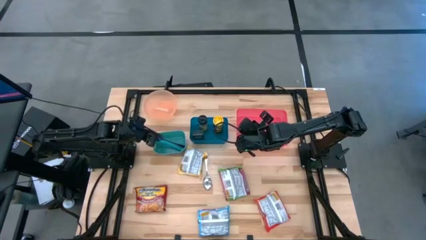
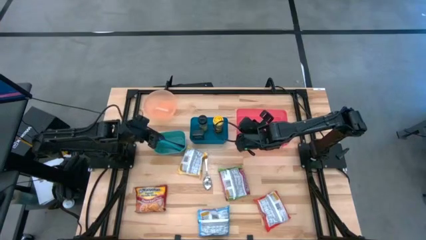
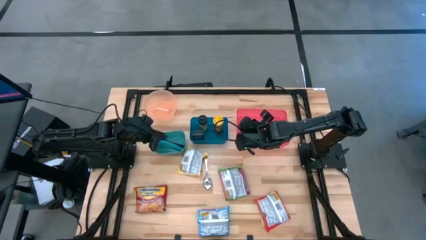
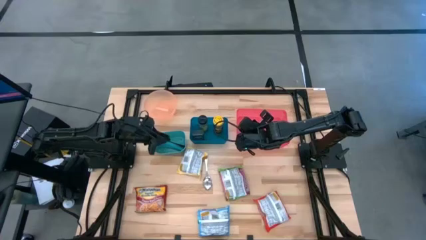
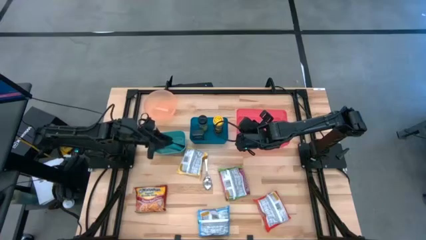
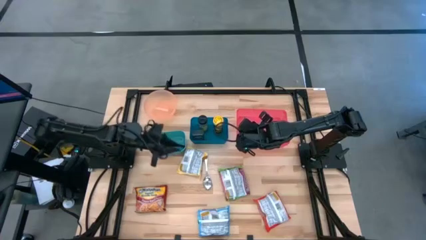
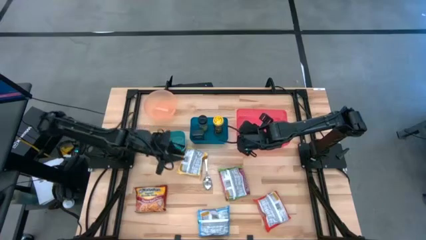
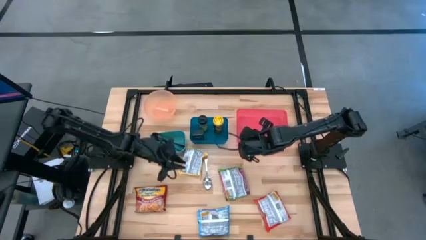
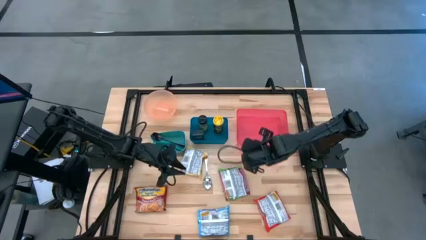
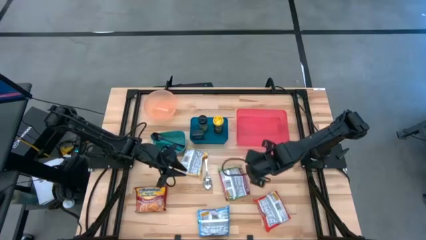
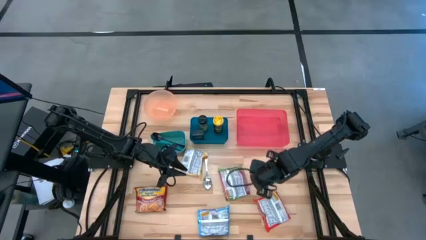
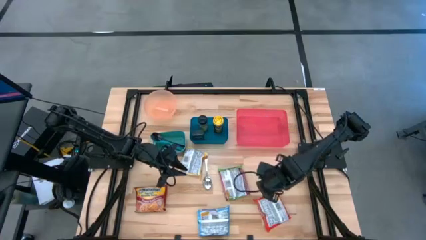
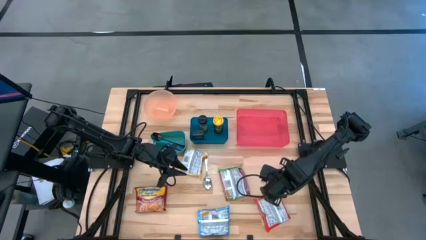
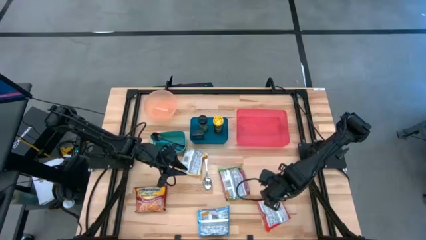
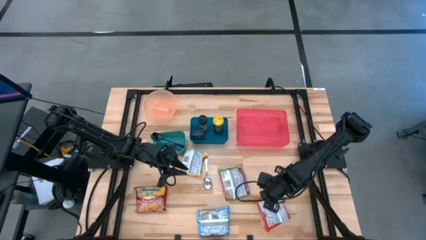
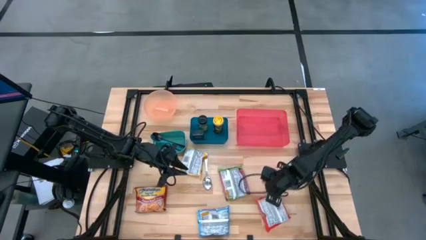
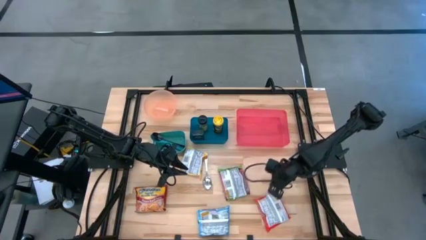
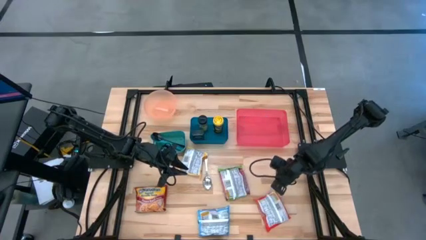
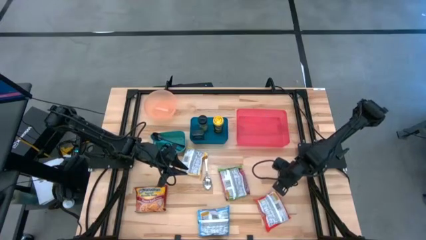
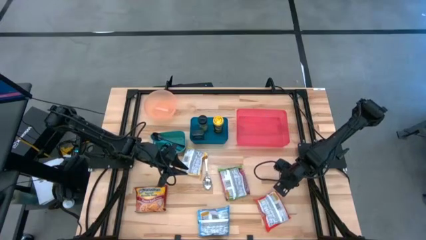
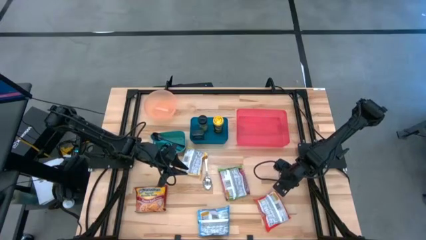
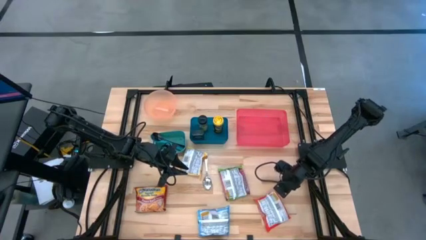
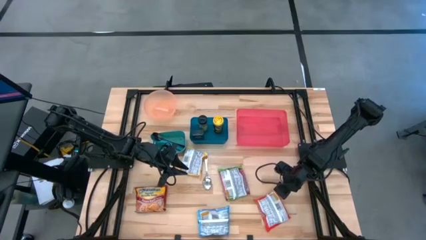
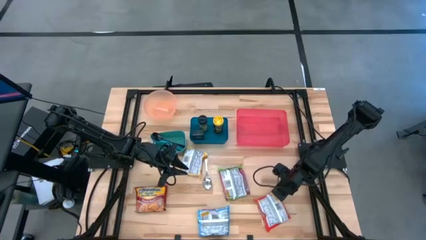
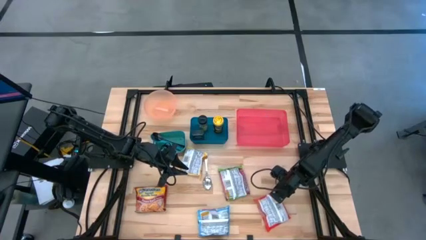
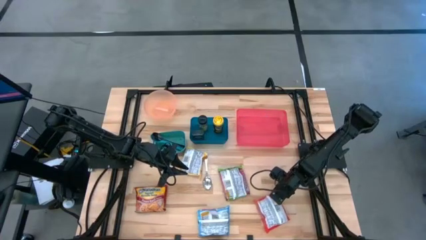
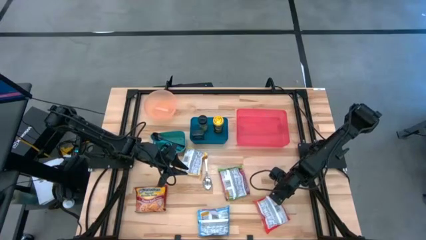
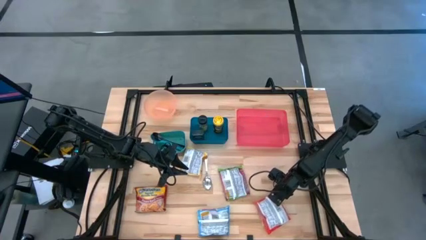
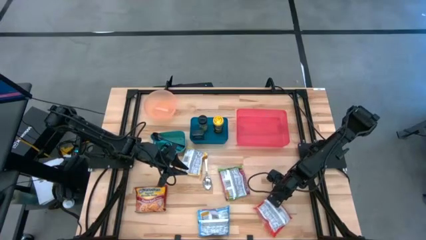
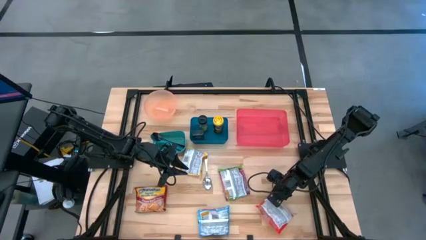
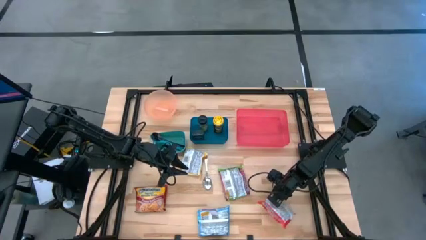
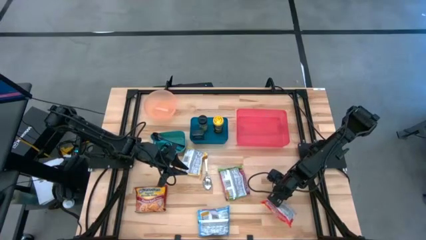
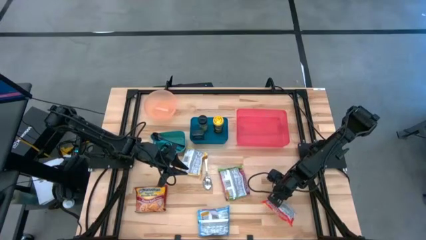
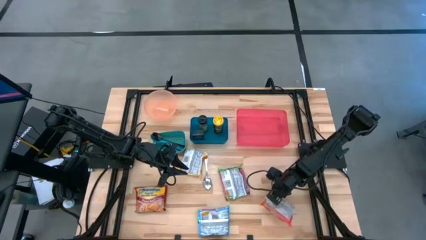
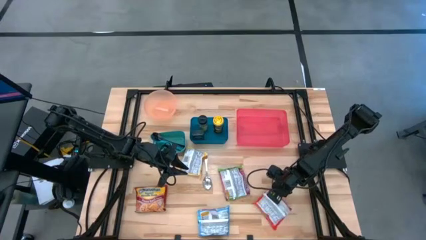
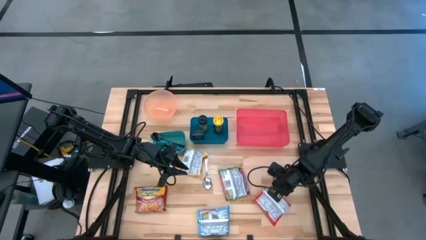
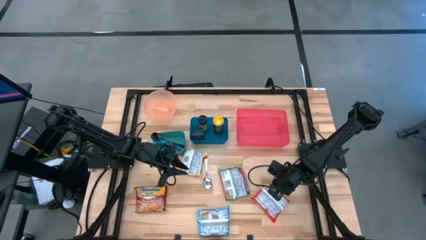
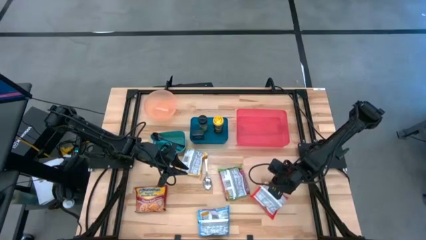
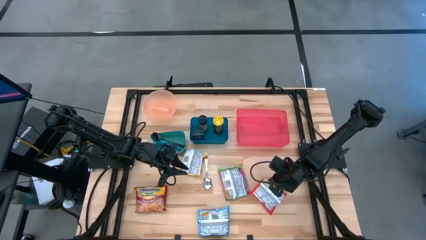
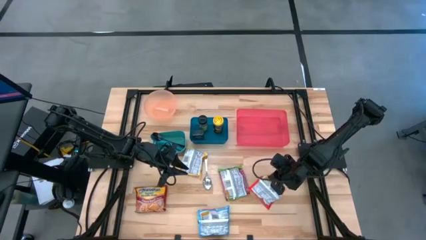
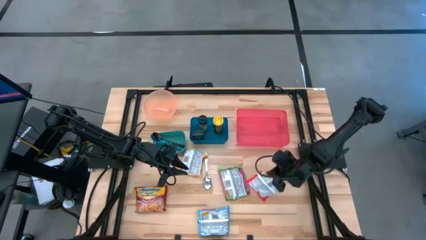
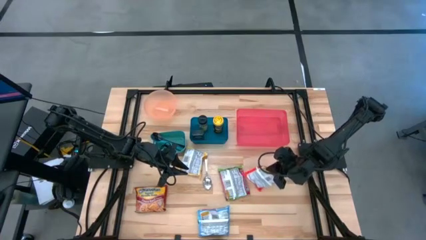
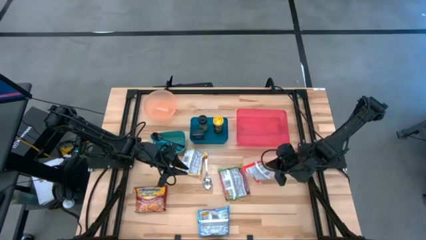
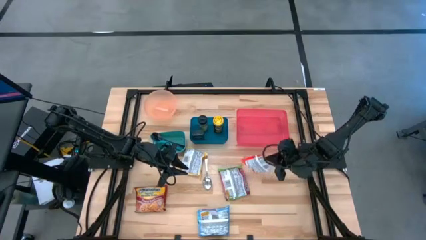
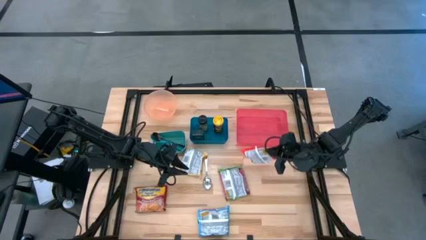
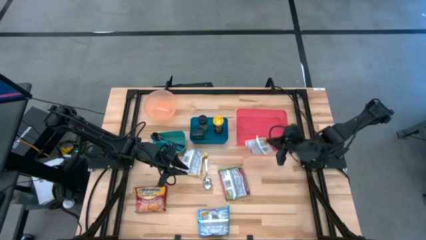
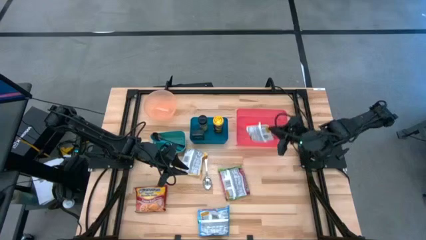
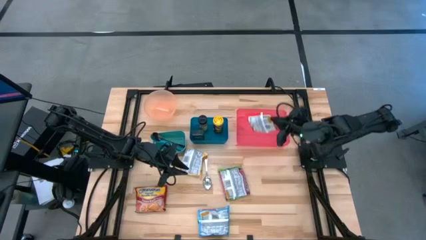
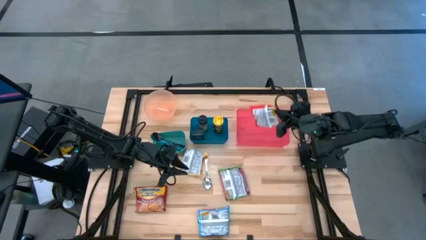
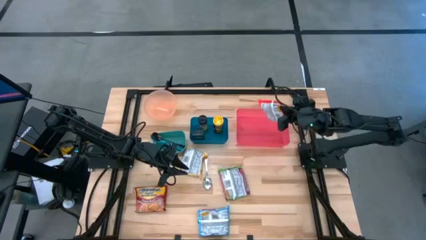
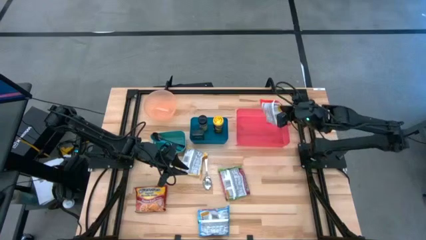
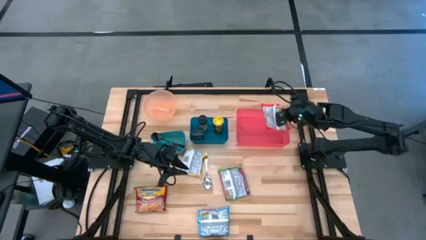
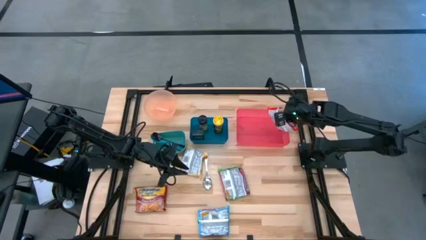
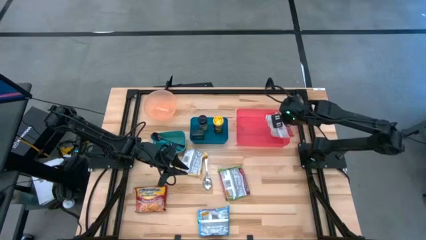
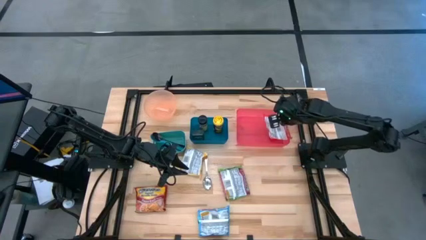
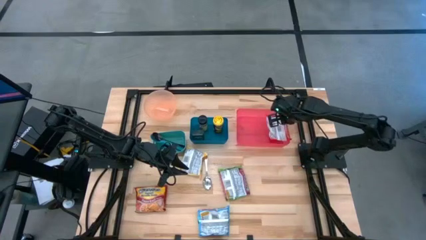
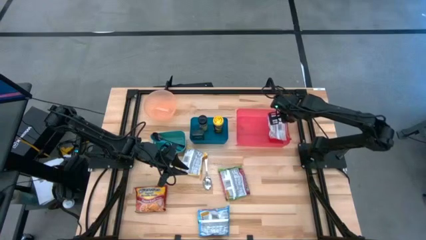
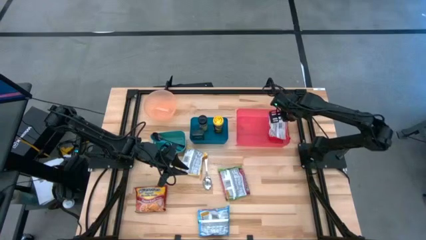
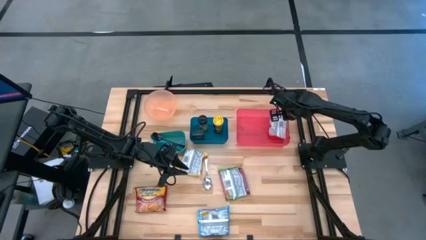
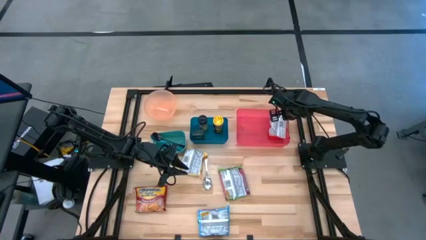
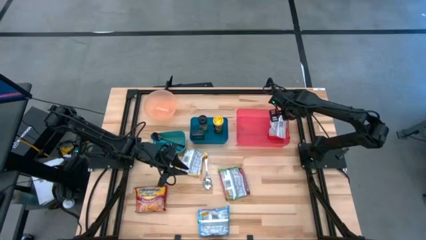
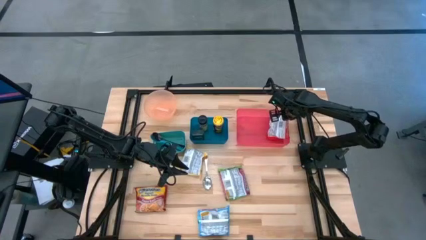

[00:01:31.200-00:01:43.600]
Task: Pick & Place Food Item
Put the red noodle pack into the pink bin

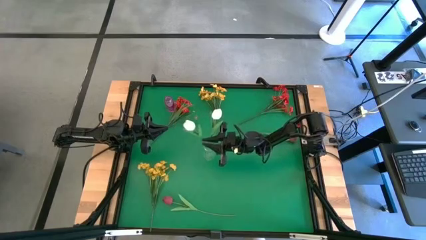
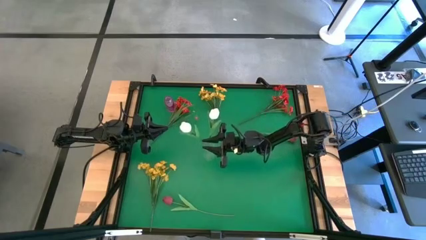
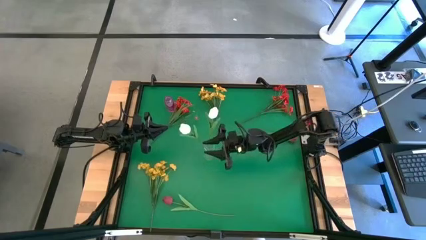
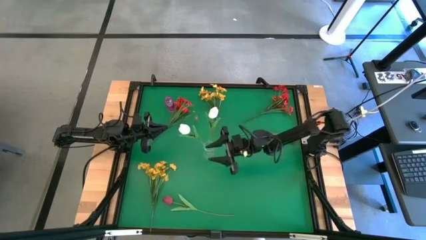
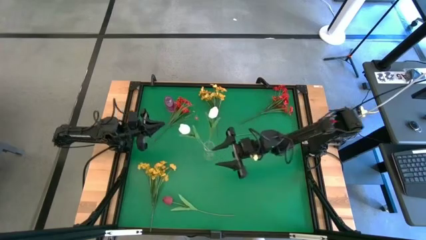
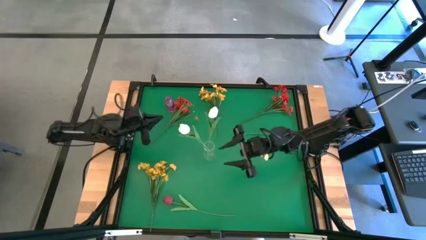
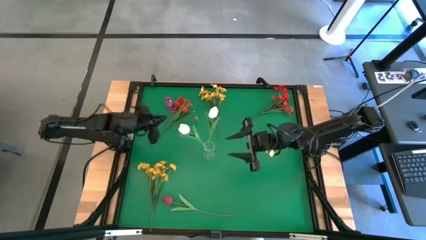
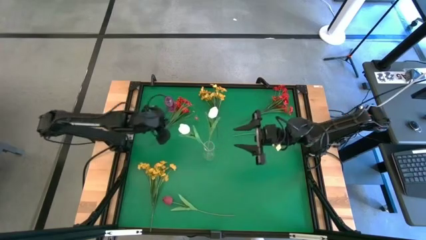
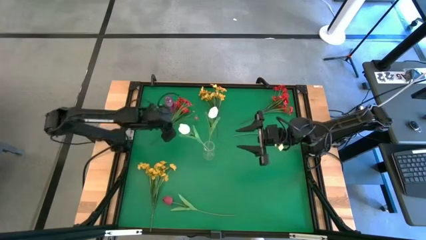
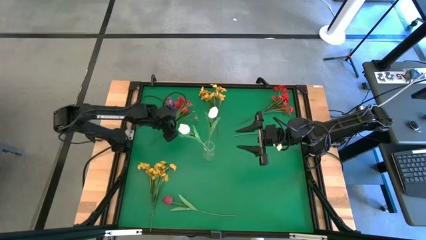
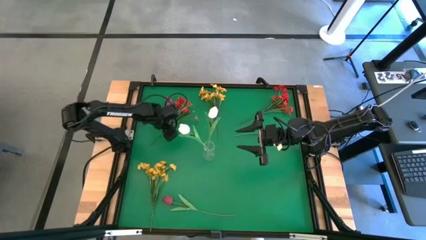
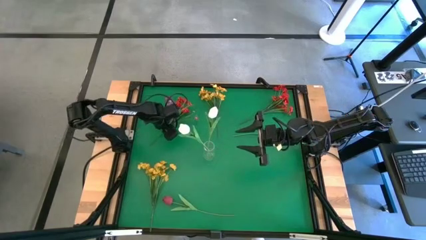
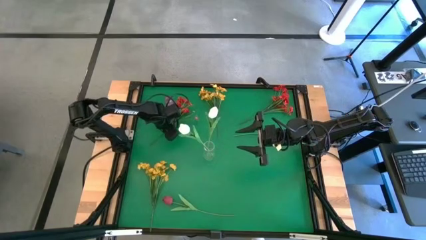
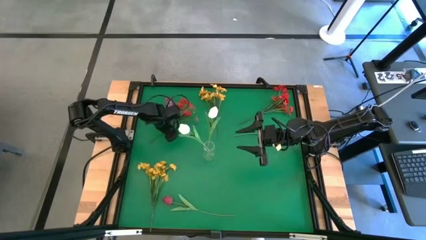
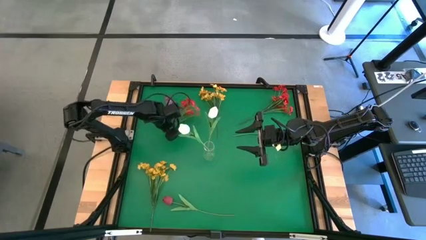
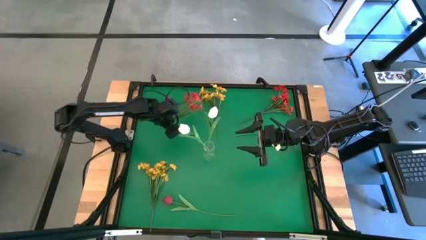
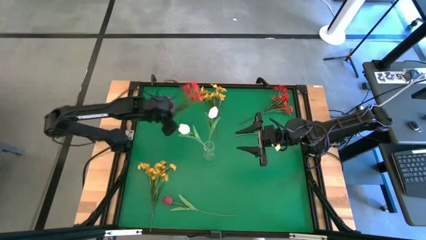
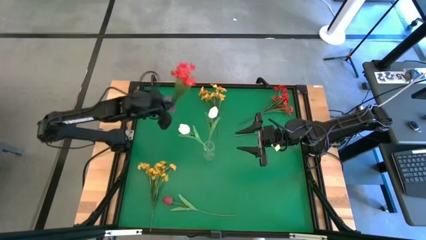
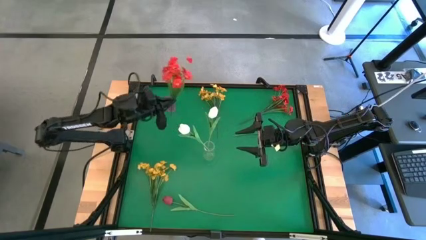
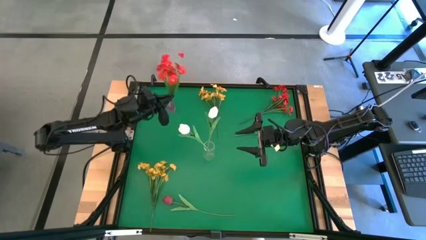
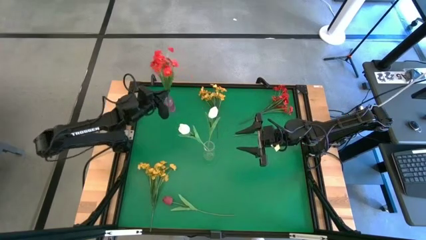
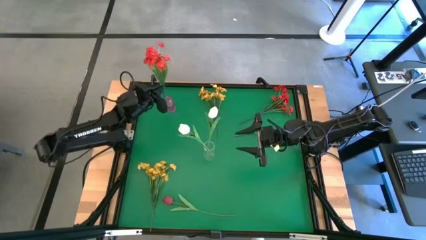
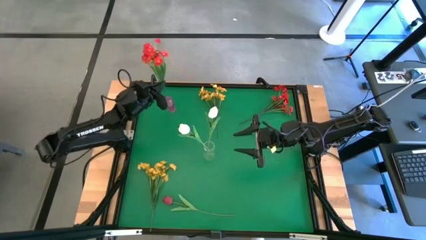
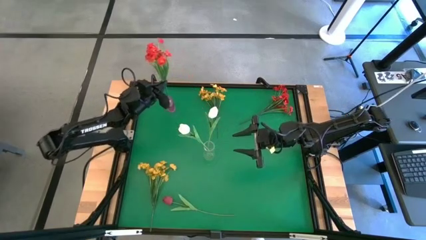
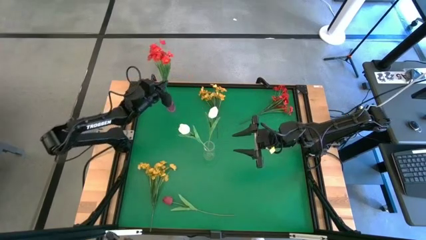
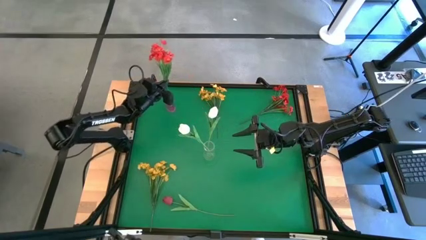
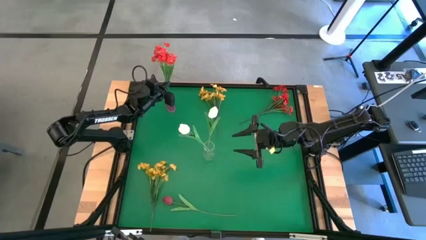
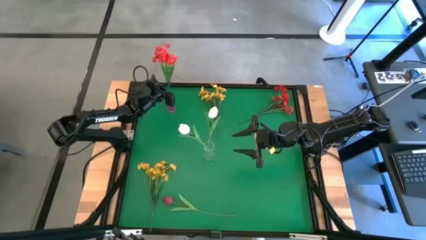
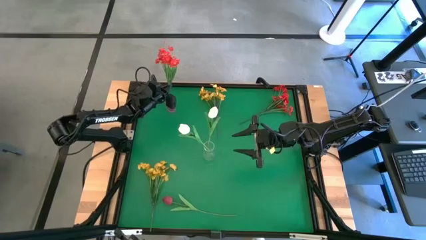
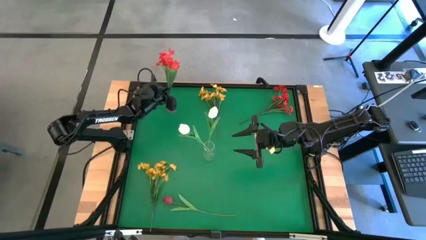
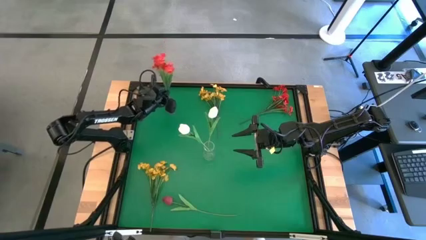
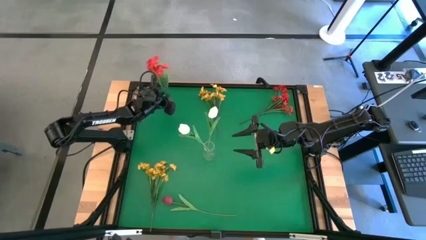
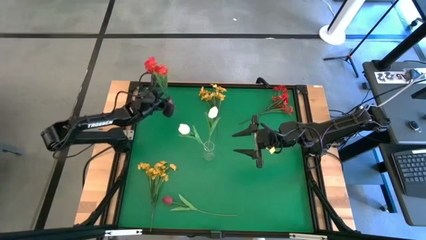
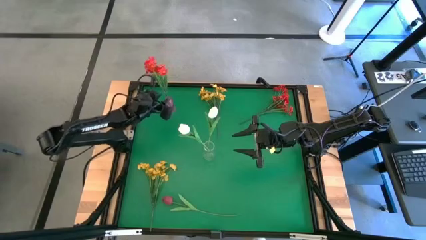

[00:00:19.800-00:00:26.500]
Task: Sort flowers into vase by color
Put the left red flowers into the pink vase
